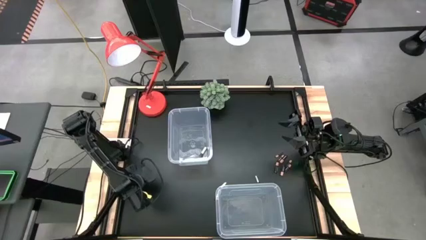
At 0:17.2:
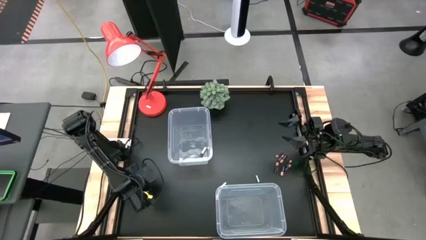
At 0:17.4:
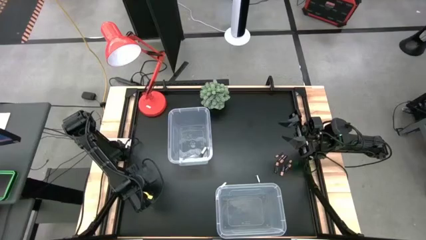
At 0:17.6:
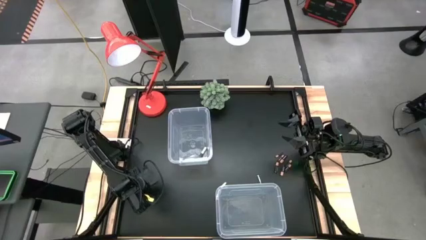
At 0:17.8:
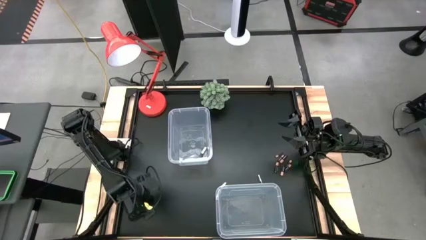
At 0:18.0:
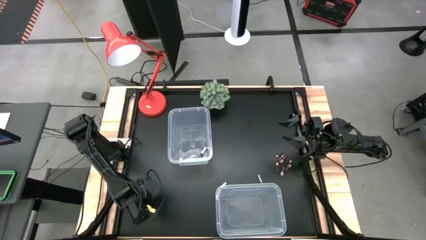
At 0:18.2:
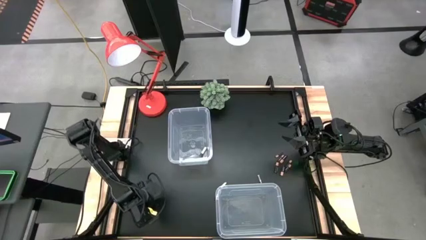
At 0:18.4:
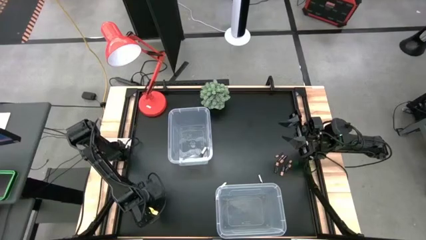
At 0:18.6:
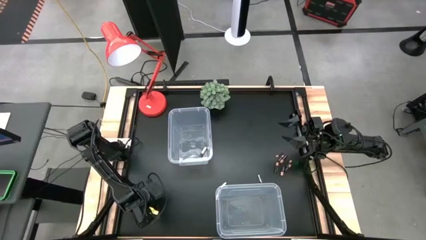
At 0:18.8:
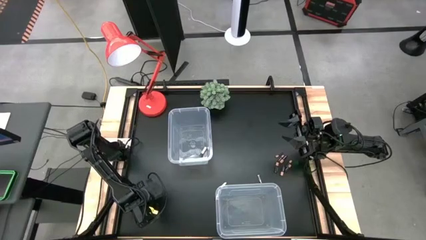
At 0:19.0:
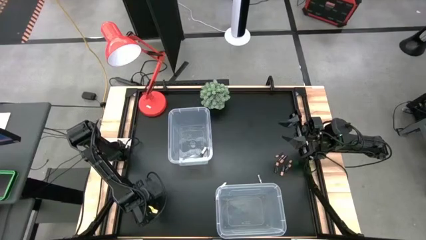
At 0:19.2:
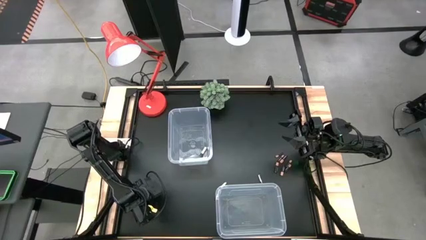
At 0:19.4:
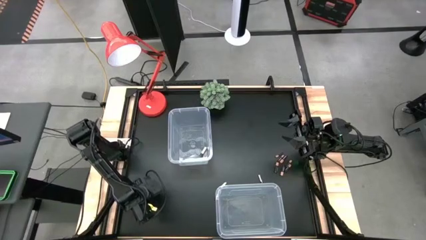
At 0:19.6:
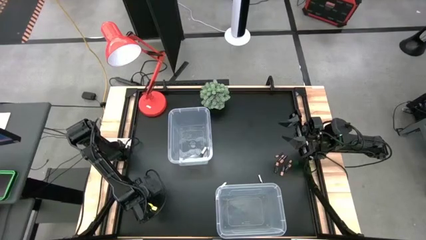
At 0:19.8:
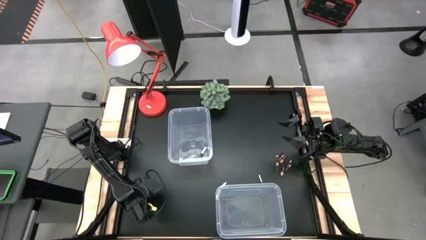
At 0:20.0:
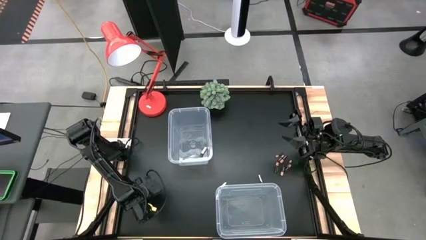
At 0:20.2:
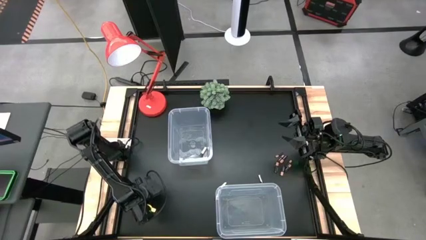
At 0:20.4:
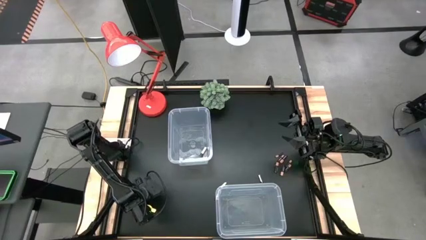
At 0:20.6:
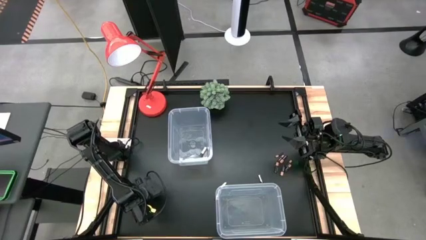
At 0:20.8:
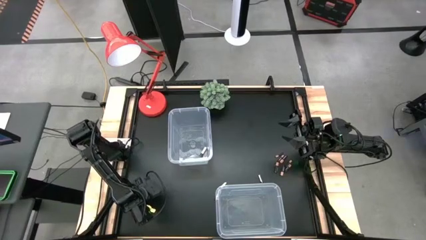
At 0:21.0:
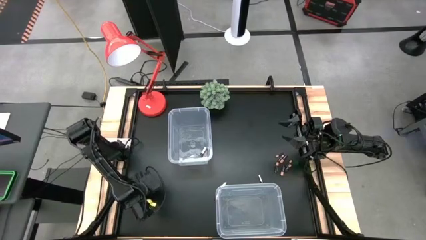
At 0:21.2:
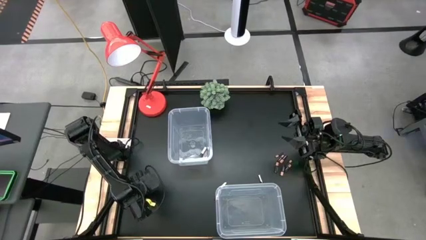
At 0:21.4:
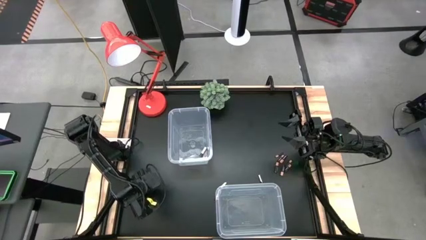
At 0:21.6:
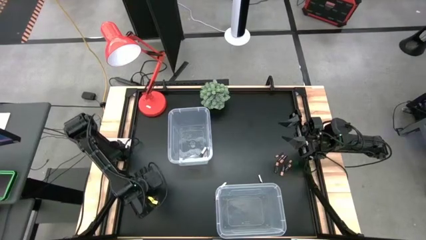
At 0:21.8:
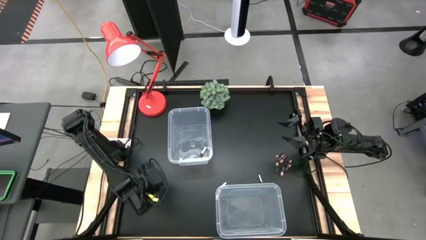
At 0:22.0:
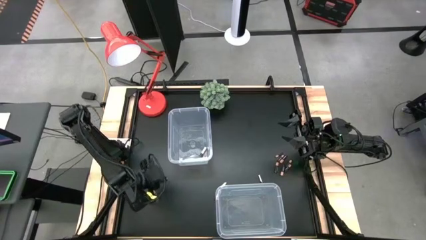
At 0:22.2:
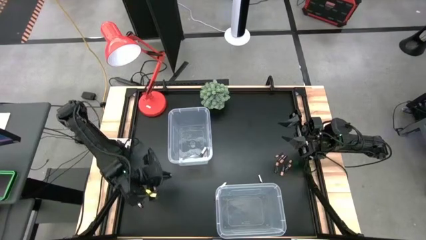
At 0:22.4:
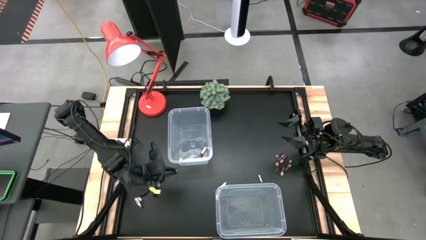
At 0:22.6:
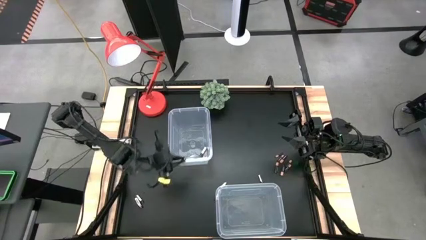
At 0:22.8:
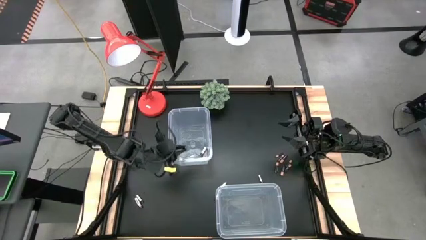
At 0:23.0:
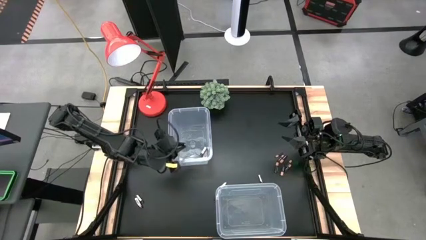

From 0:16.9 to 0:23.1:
Task: Sort batteries
Put the silver battery into the top transparent bin

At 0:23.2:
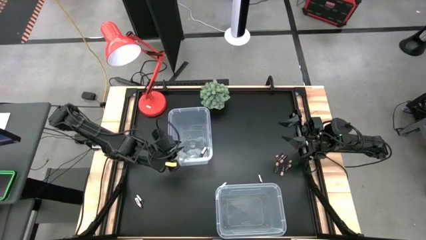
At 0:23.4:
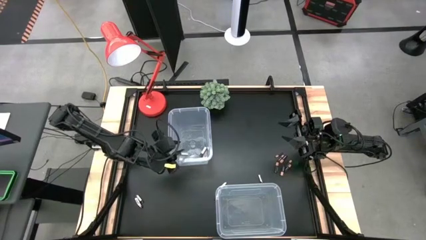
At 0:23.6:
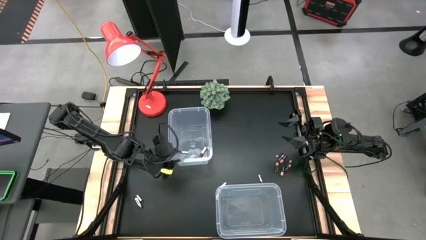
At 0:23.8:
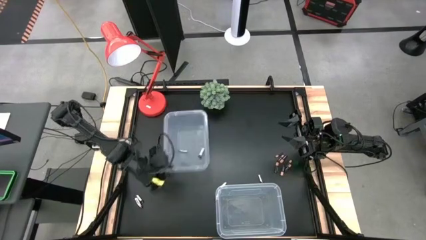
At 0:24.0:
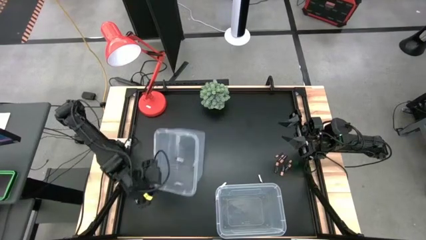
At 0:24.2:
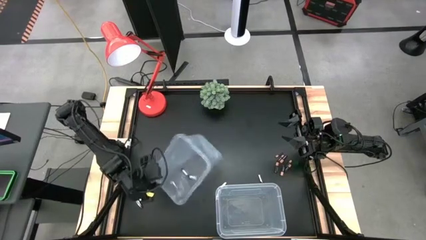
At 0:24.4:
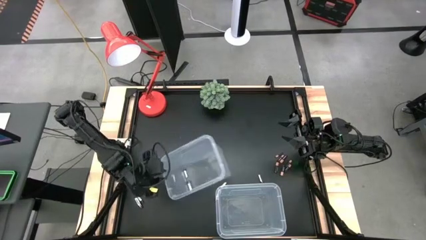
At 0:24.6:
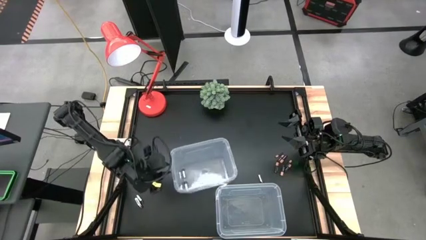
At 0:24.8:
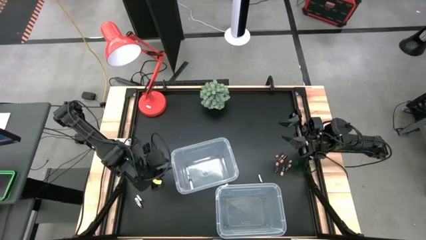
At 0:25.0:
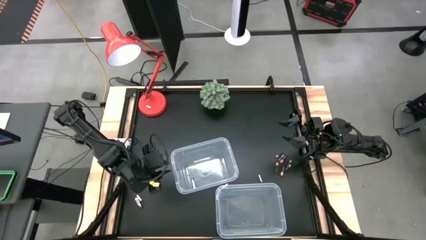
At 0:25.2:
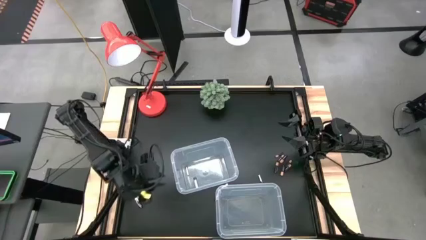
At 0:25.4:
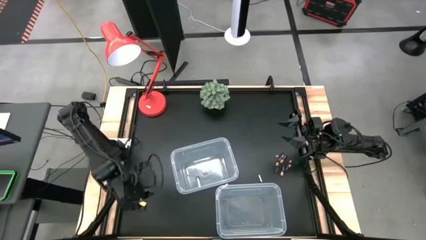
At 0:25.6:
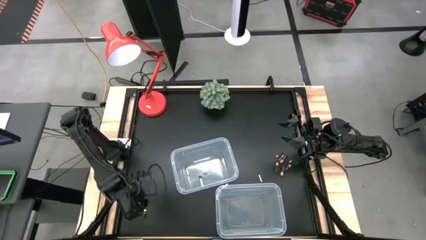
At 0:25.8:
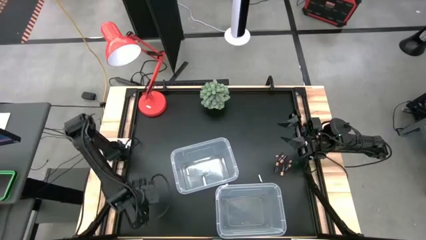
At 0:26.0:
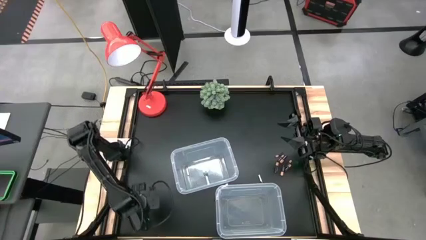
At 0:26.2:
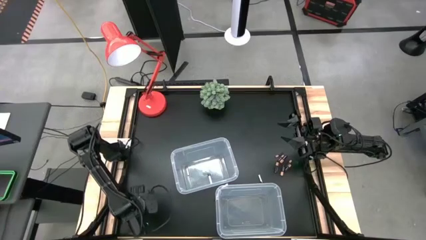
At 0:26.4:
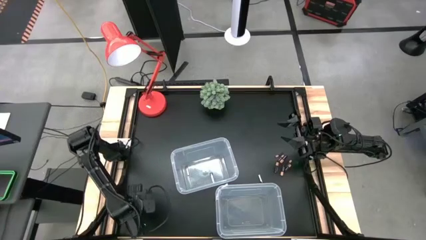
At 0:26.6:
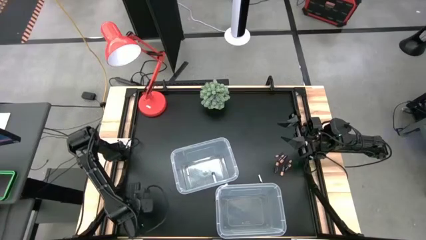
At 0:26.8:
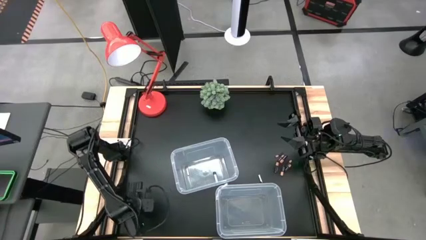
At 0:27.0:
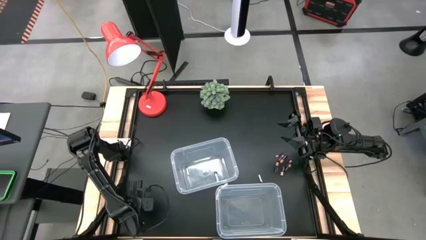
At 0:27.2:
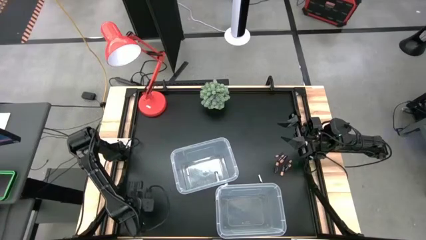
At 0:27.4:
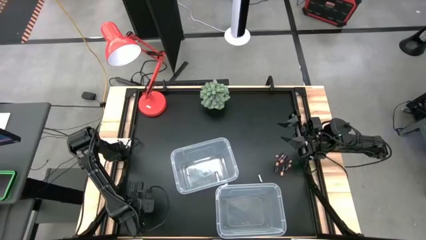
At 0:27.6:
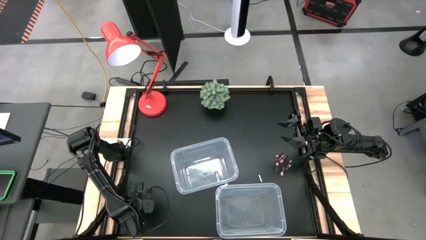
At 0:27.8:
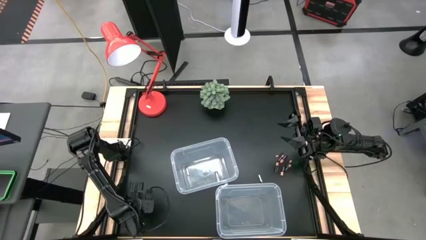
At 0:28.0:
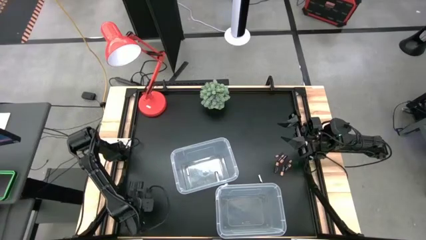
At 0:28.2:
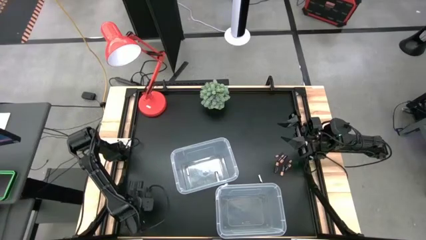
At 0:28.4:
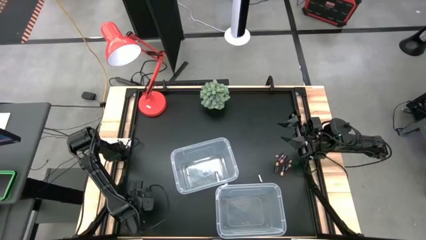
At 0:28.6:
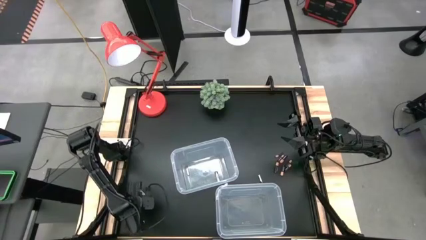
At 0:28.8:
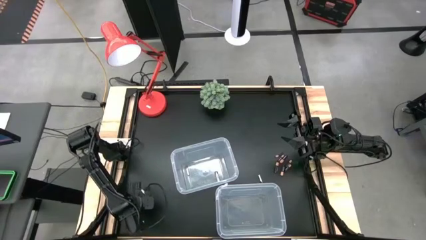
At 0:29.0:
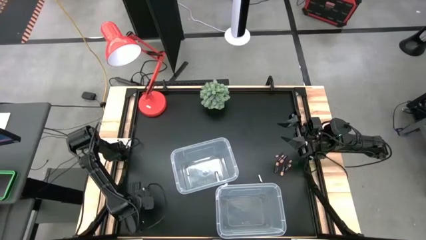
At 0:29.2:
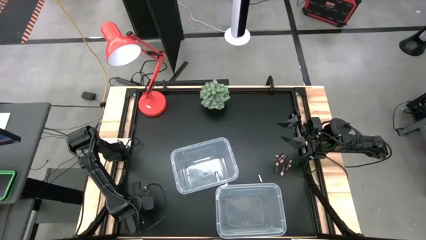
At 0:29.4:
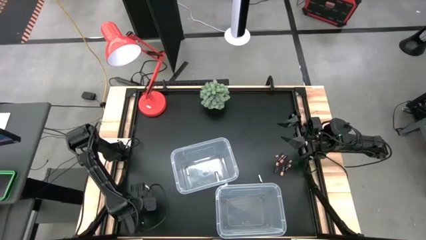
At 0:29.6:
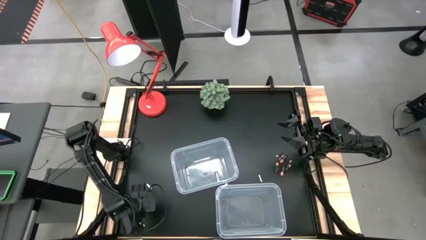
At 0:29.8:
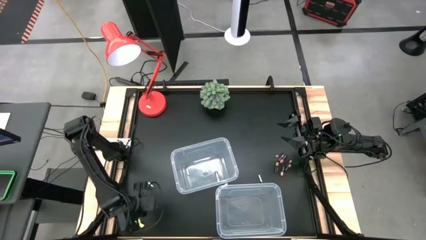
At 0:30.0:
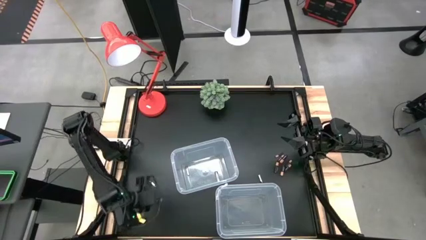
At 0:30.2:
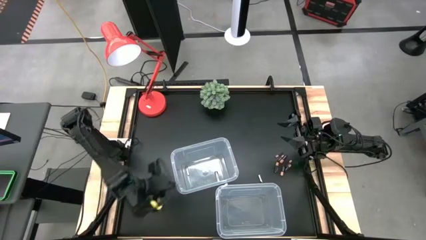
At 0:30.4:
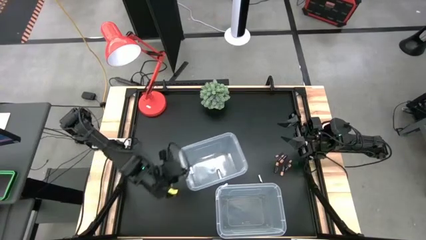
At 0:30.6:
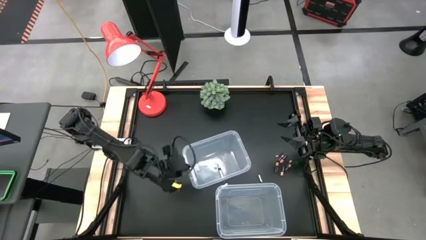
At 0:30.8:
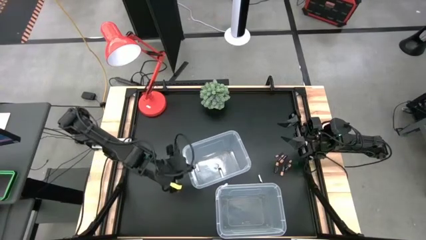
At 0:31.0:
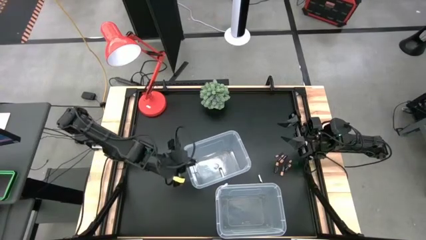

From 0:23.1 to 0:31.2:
Put the silver battery into the top transparent bin

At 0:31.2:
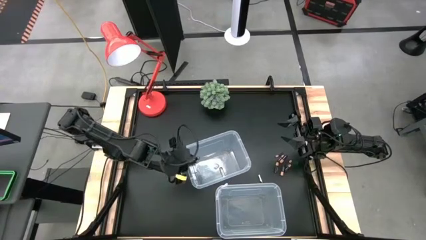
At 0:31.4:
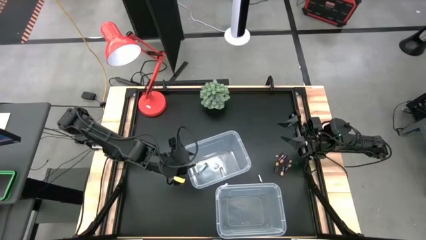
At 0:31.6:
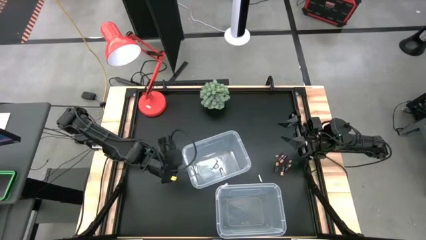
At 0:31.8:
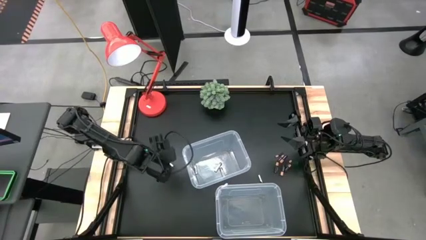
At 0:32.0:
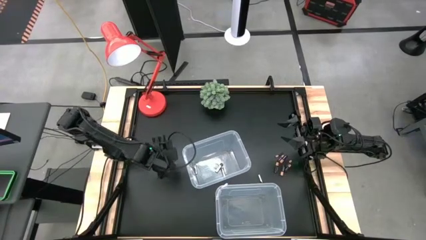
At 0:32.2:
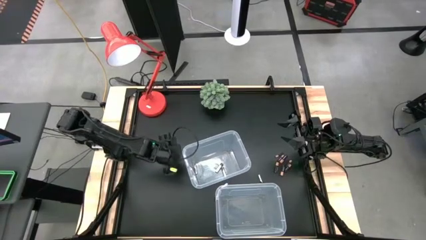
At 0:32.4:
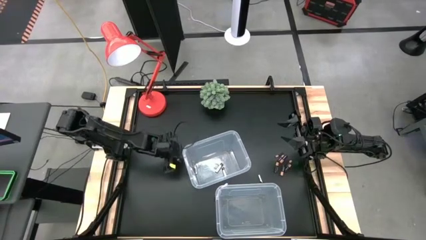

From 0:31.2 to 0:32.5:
Put the silver battery into the top transparent bin
